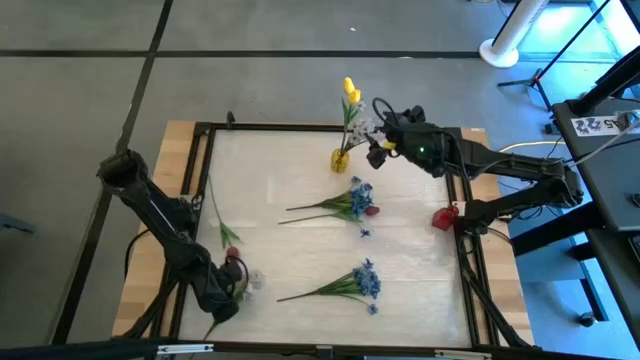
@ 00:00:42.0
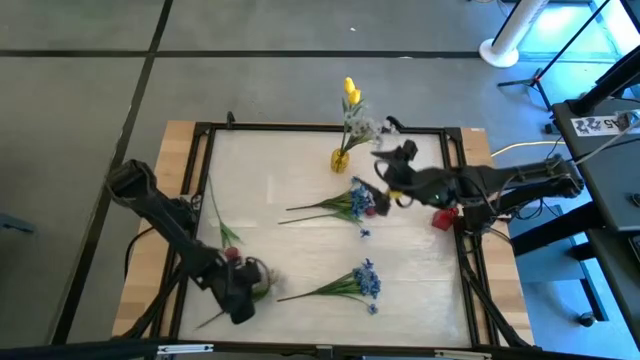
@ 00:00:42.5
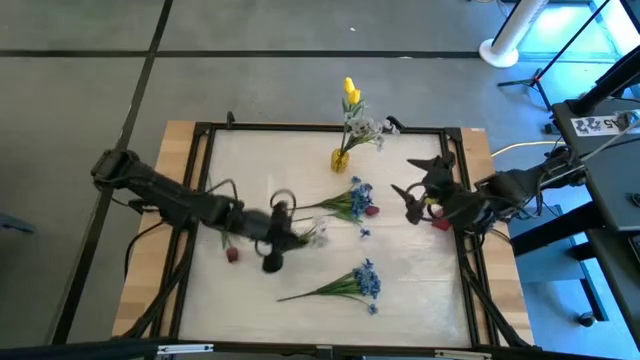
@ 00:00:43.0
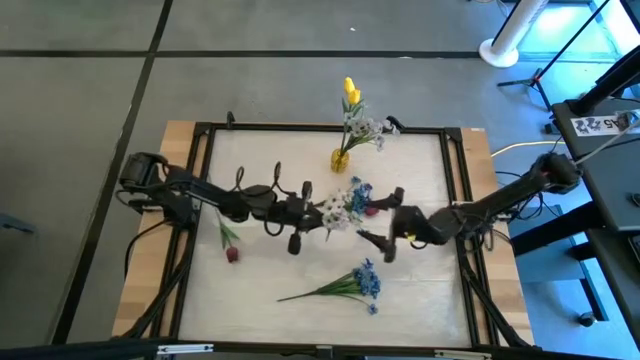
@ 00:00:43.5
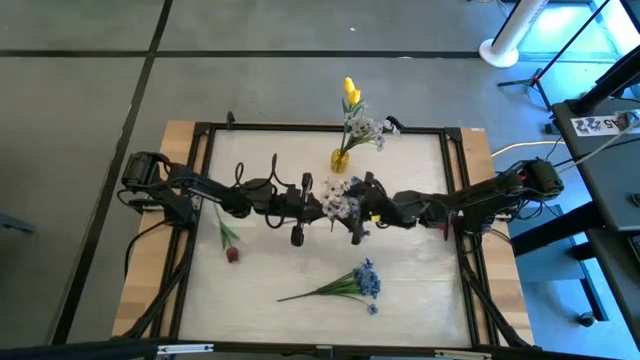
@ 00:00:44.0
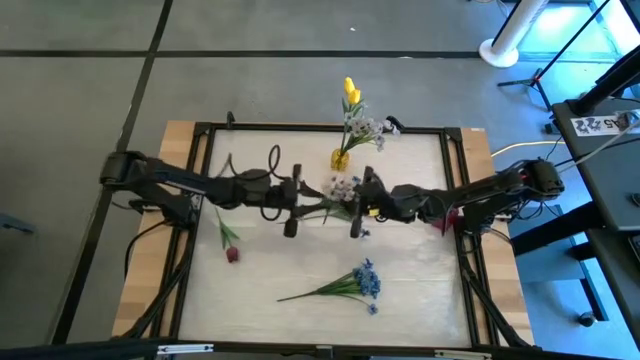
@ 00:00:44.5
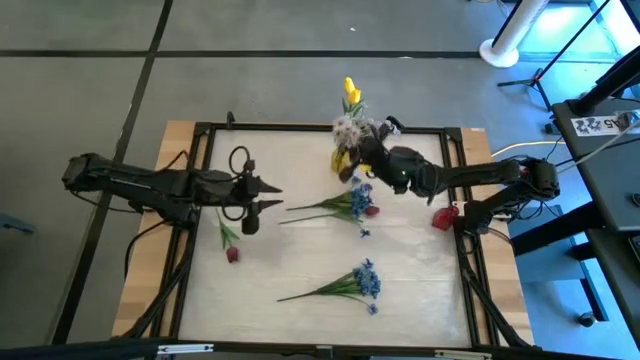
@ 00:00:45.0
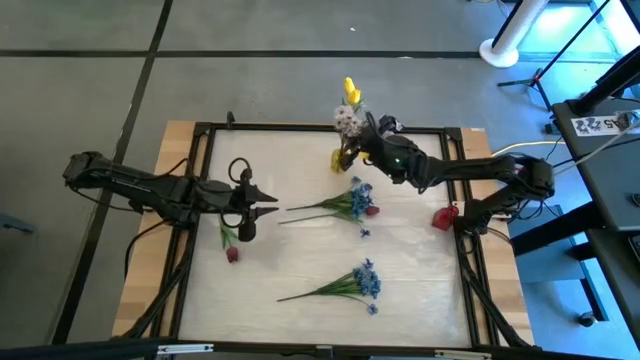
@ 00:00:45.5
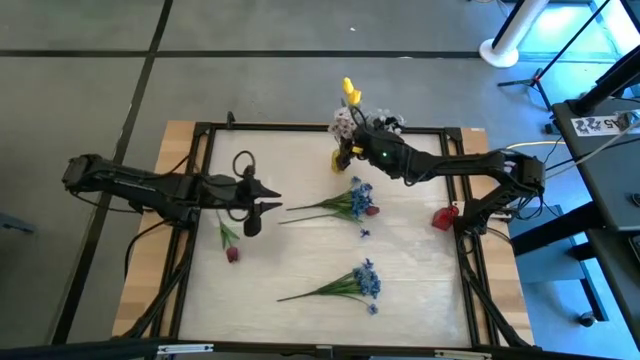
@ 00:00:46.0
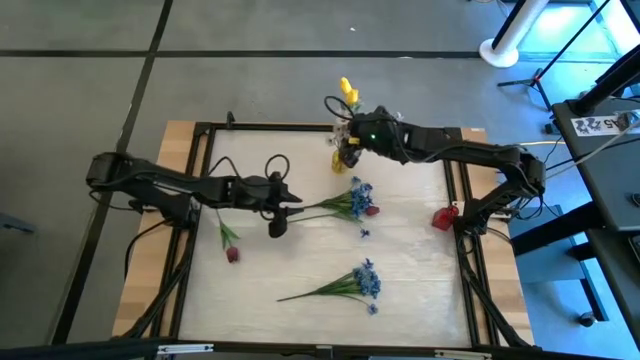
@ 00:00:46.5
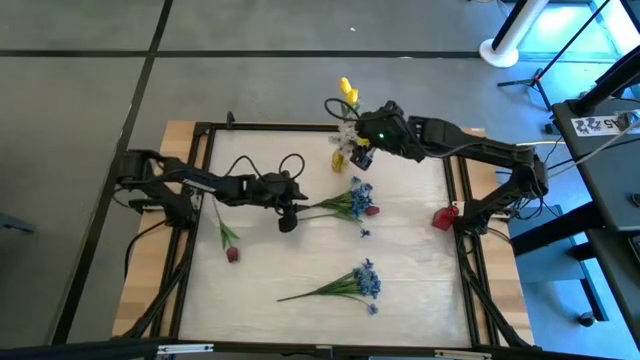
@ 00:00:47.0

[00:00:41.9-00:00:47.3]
Task: Sort flowers into vase by color
Put the white flowers into the yellow vase

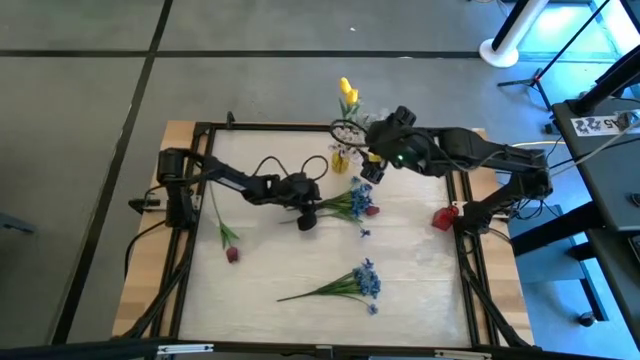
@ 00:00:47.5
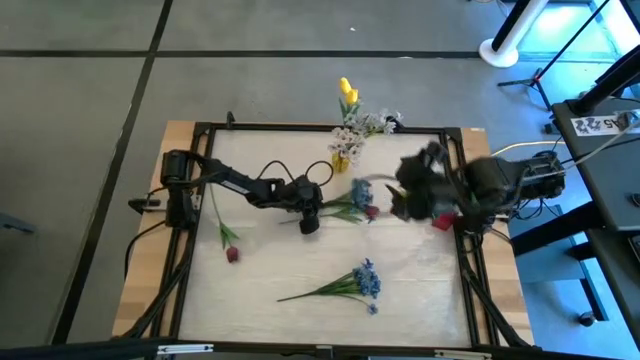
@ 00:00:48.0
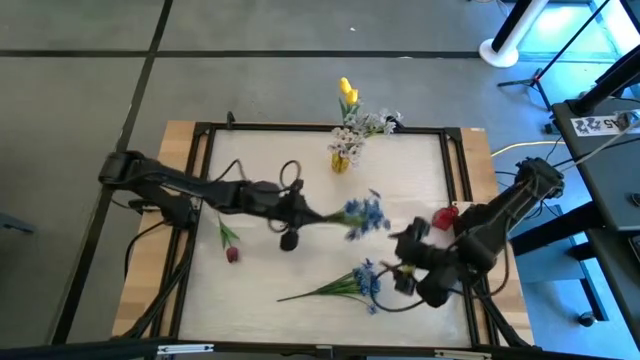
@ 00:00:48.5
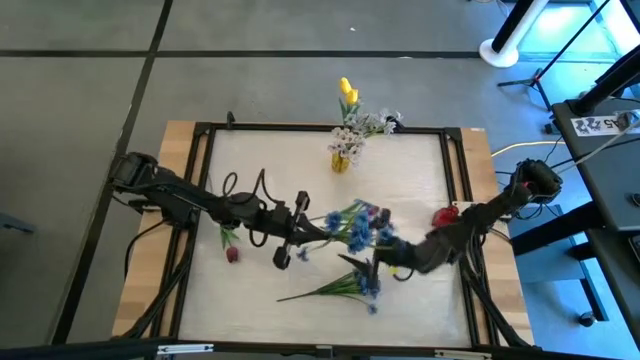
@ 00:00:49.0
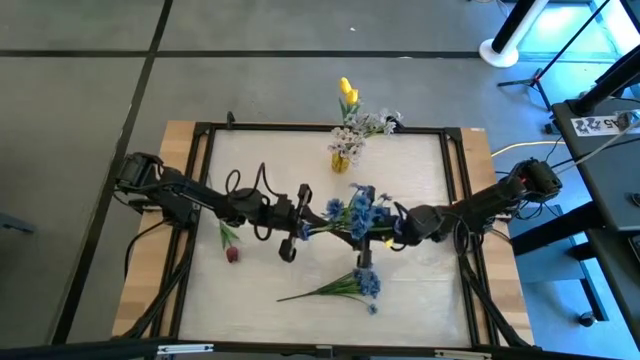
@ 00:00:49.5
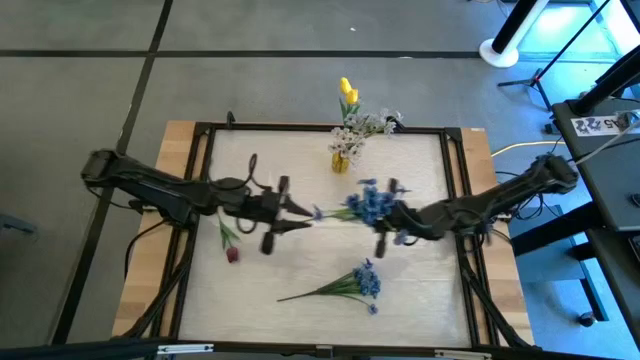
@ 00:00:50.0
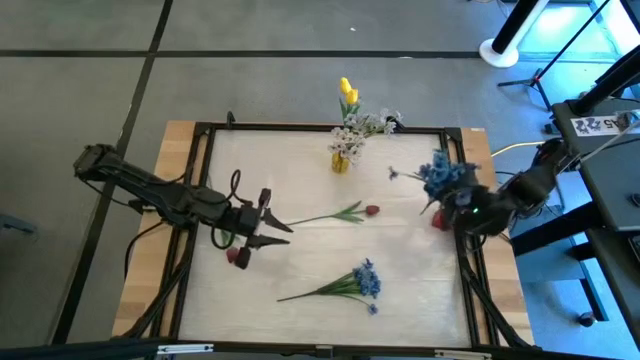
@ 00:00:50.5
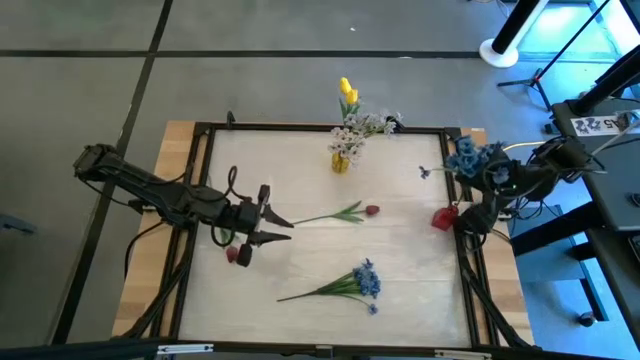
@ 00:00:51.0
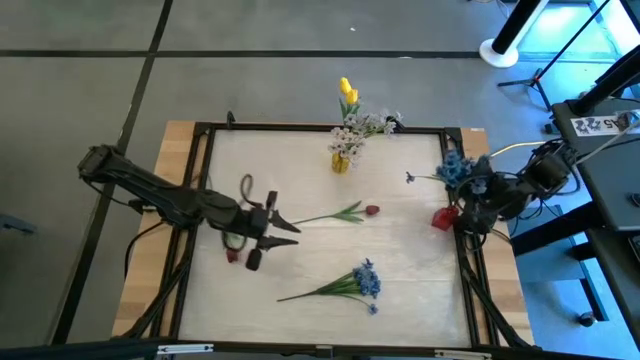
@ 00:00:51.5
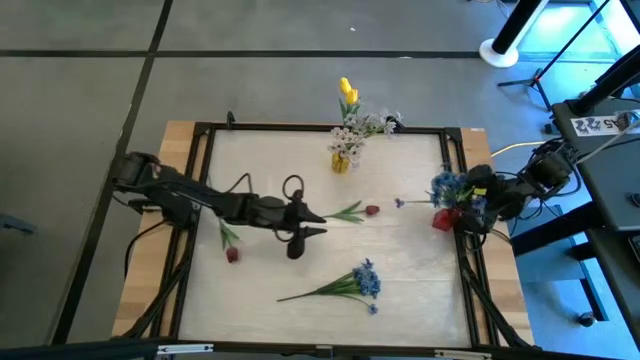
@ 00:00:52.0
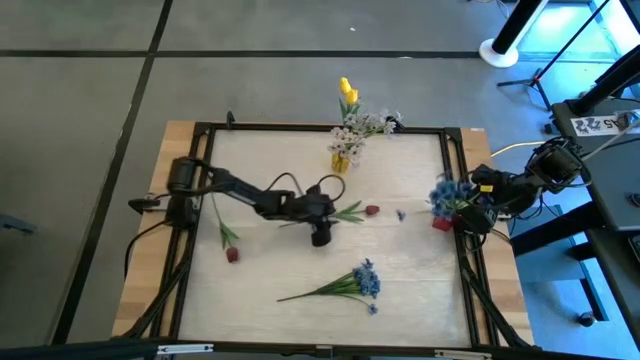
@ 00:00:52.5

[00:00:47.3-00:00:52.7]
Put the top blue flowers into the red vase

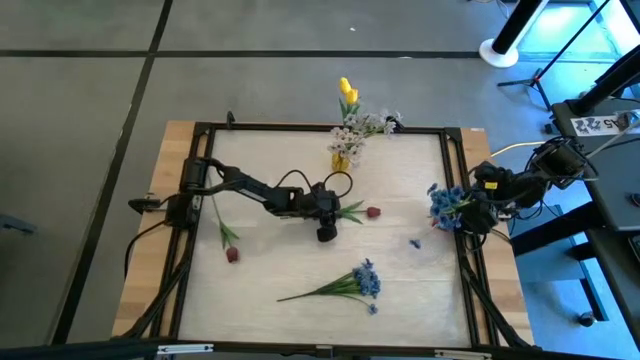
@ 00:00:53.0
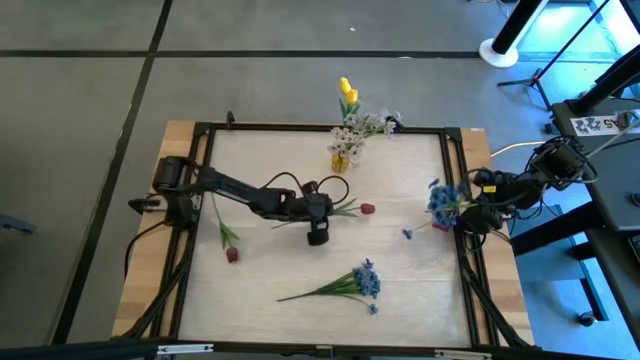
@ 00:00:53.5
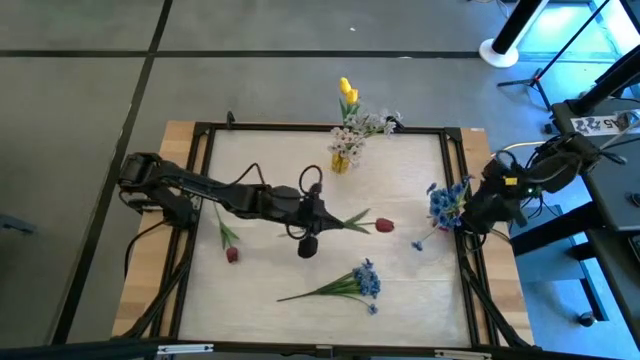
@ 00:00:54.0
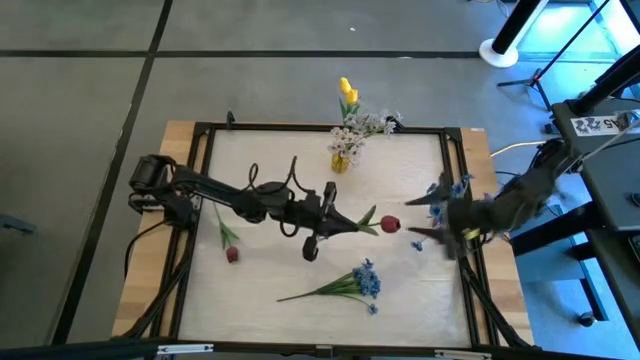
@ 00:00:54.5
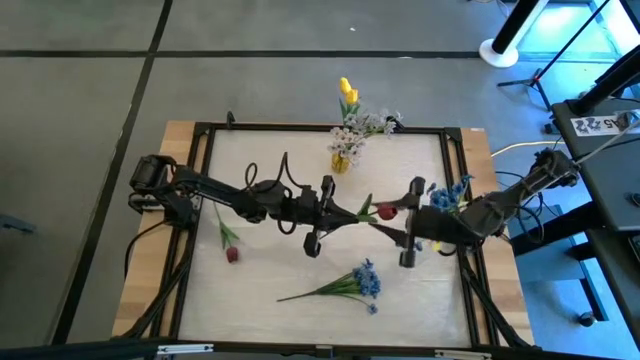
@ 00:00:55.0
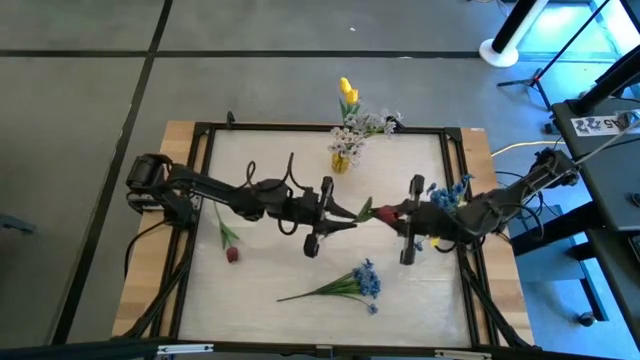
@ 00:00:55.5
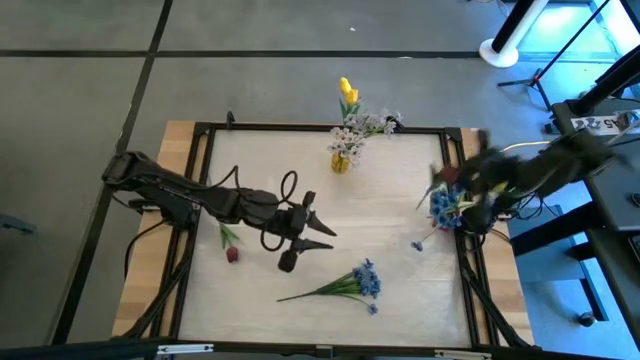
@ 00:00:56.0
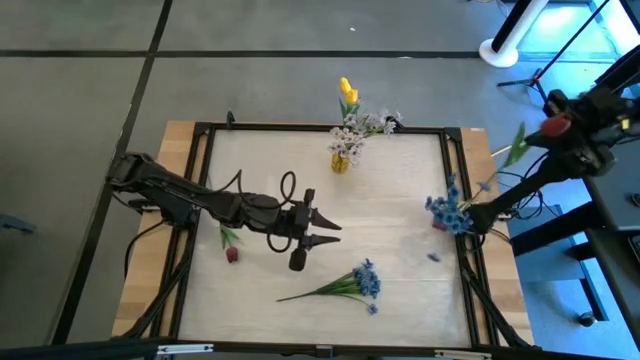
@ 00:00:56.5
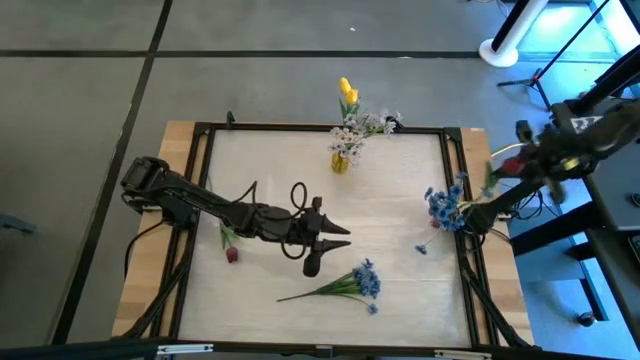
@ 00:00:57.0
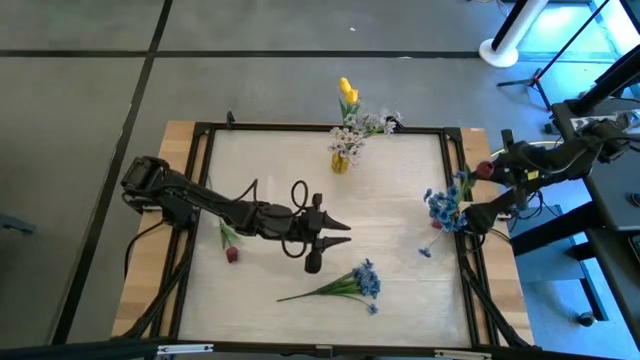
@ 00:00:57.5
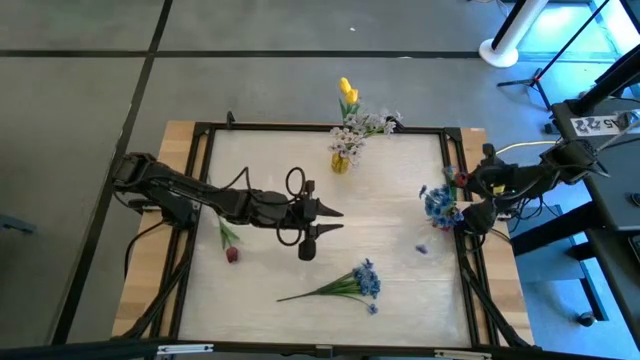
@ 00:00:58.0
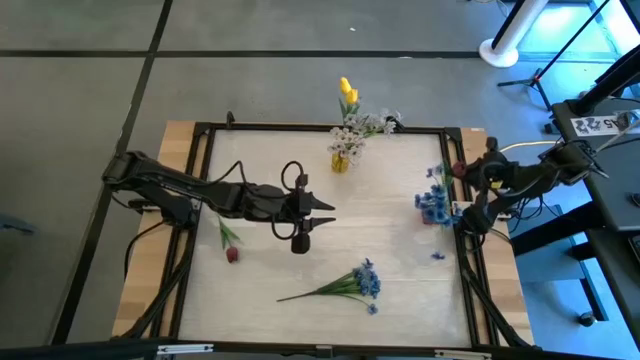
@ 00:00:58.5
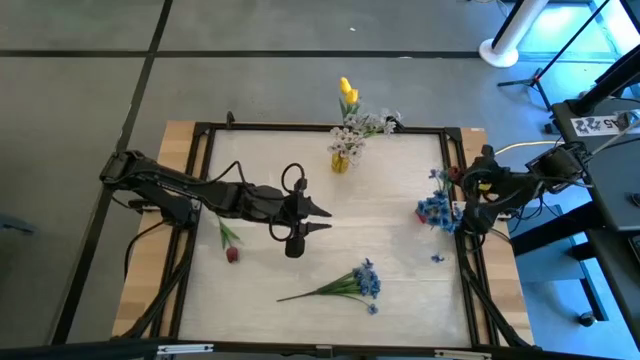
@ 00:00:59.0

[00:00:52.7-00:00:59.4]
Put the right pink flower into the red vase
